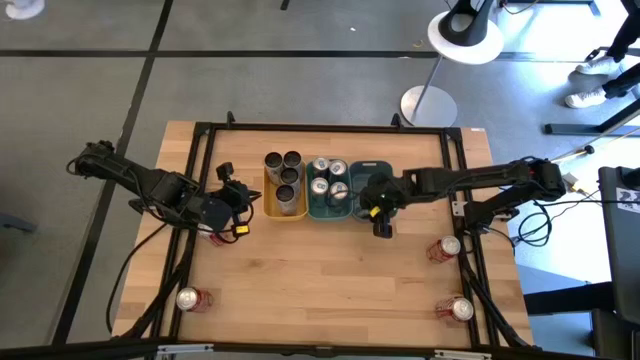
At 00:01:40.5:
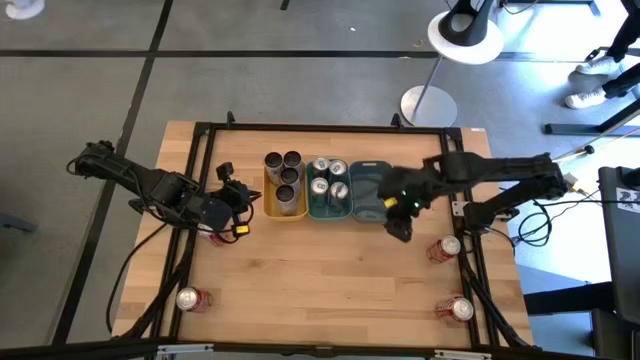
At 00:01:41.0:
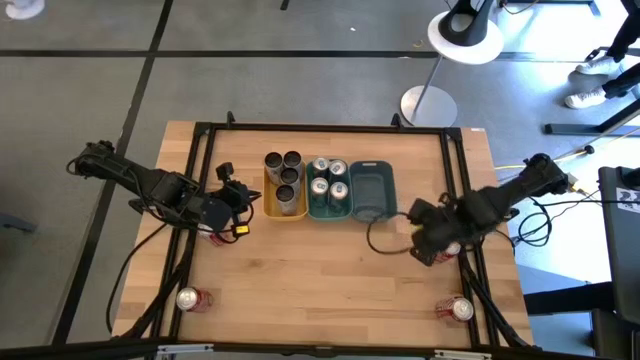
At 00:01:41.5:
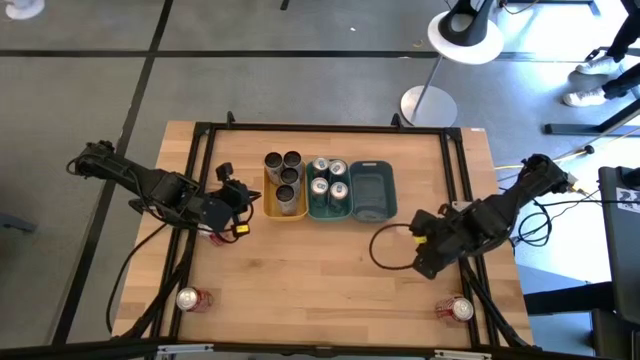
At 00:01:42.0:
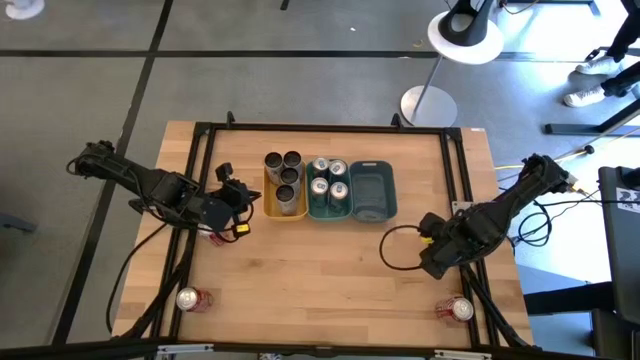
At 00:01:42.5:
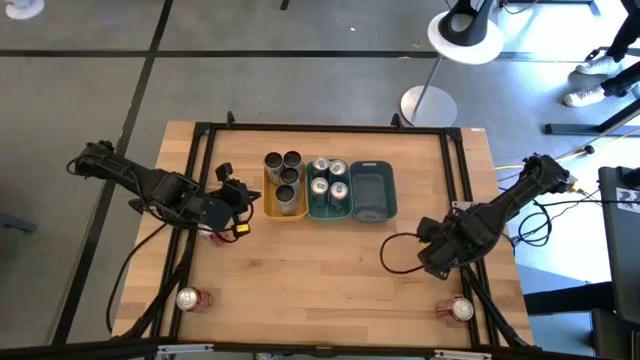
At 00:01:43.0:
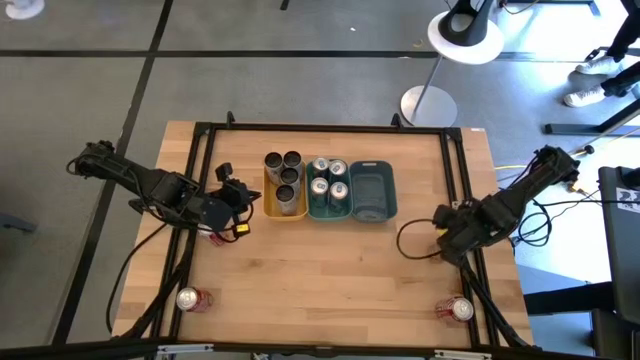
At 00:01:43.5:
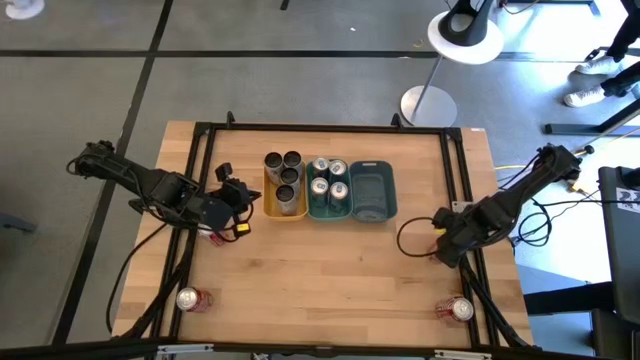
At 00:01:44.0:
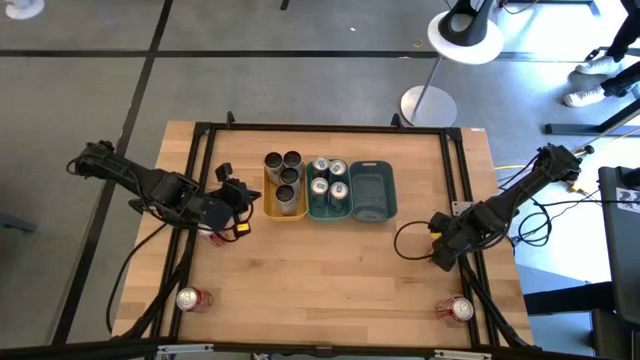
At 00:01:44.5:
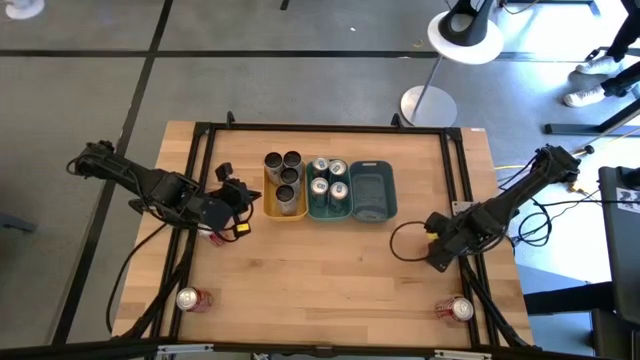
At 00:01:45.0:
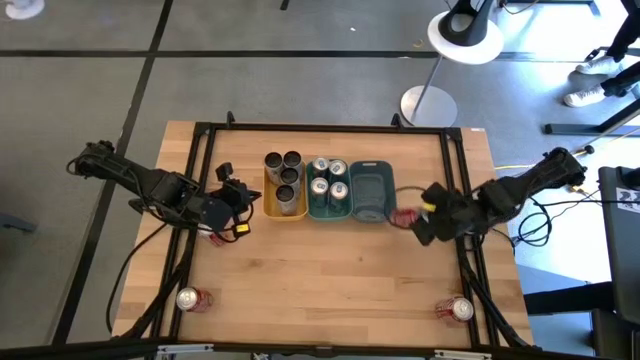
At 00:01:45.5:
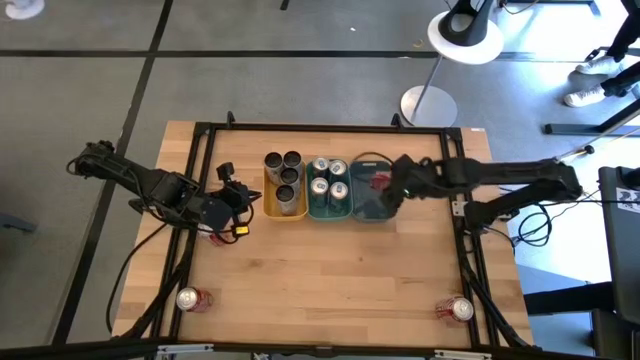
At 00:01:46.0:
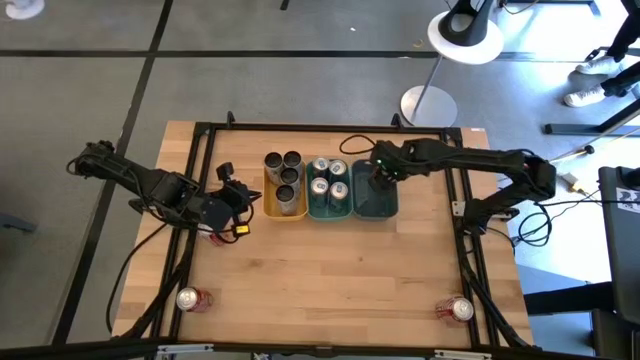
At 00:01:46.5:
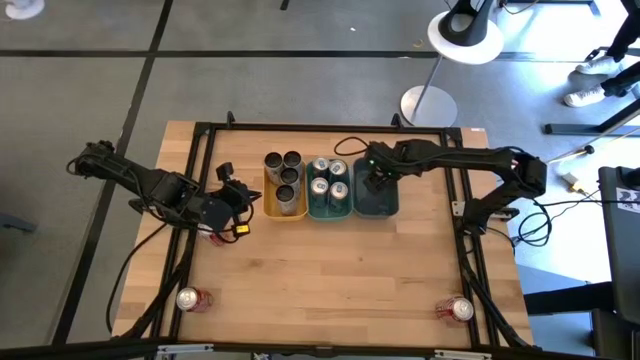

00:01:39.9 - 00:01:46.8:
Task: Sort soda cans
Put the top right red-white soda can into the blue bin

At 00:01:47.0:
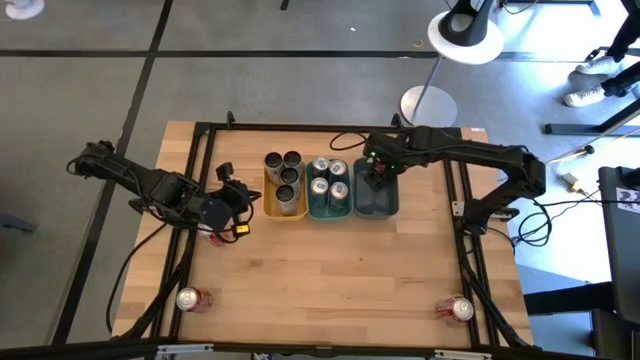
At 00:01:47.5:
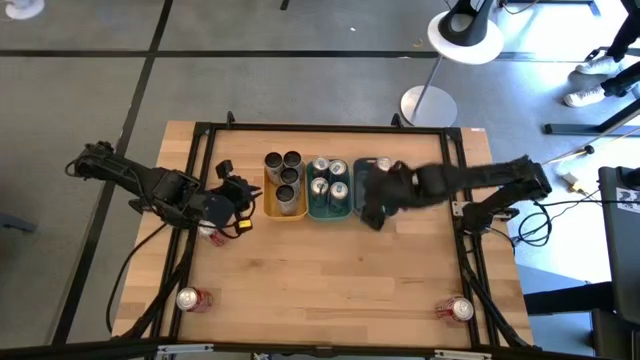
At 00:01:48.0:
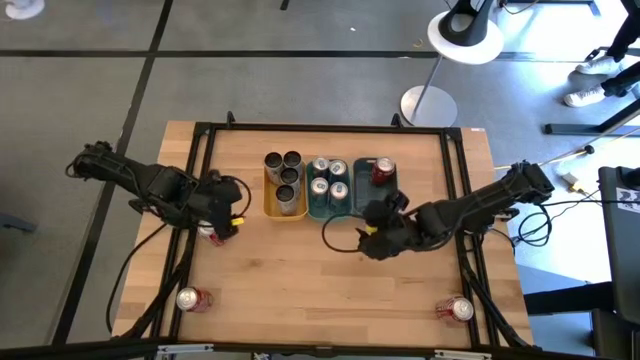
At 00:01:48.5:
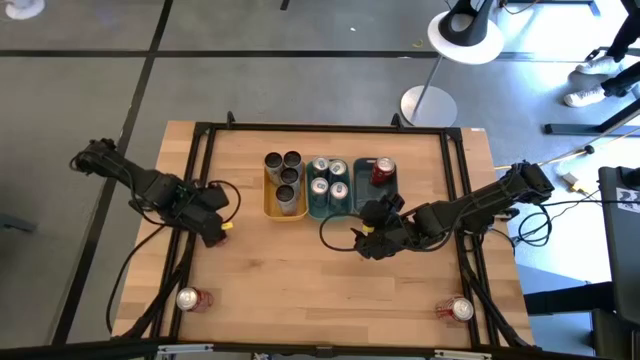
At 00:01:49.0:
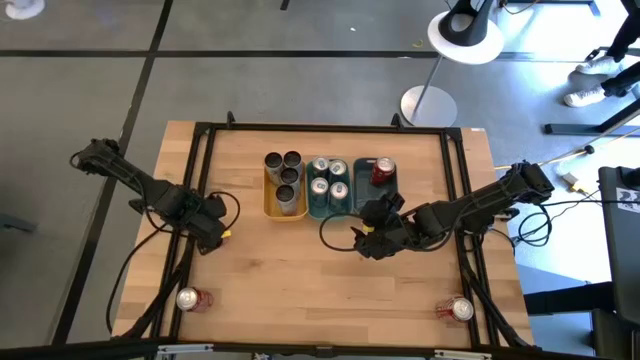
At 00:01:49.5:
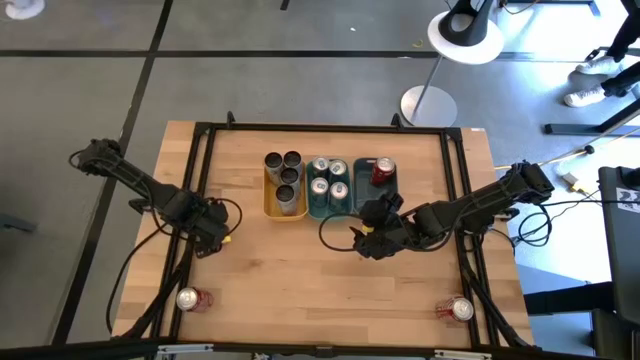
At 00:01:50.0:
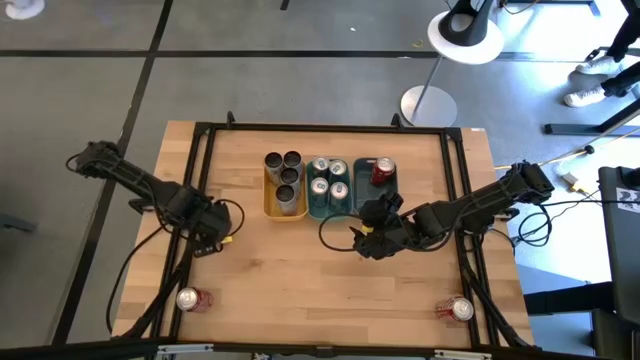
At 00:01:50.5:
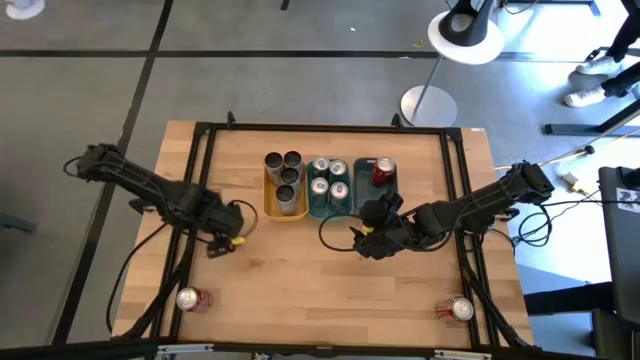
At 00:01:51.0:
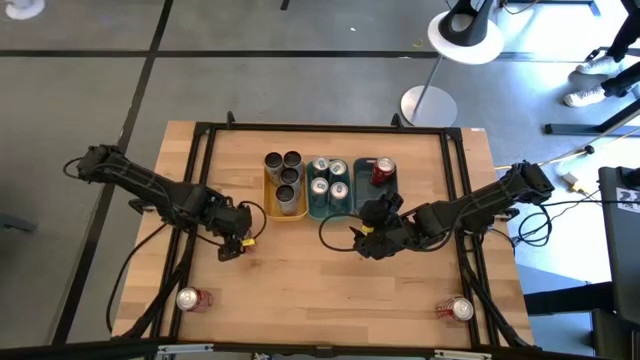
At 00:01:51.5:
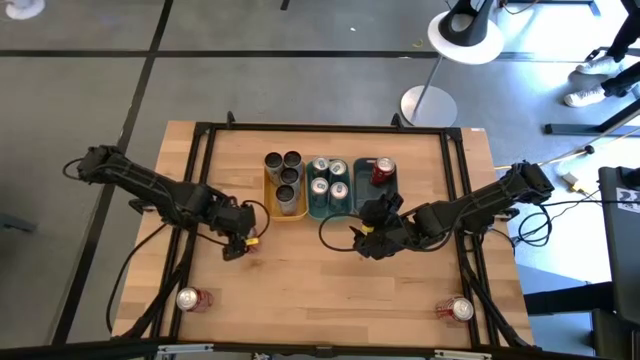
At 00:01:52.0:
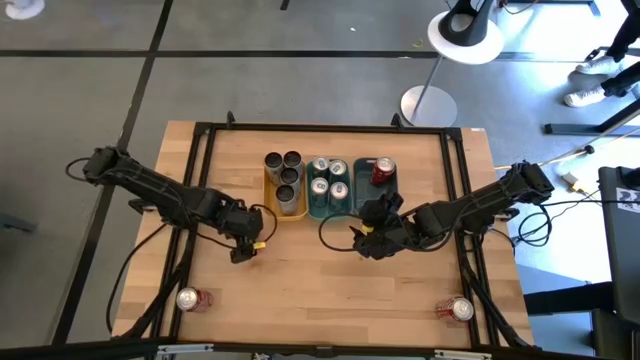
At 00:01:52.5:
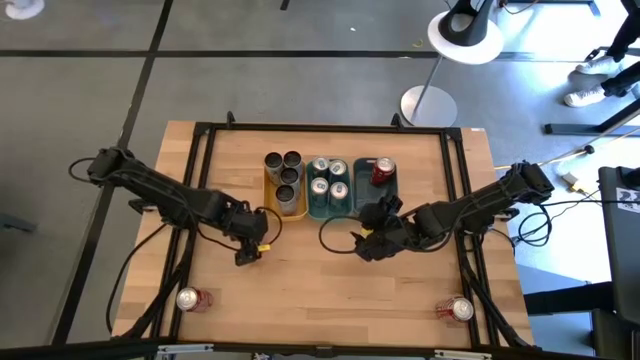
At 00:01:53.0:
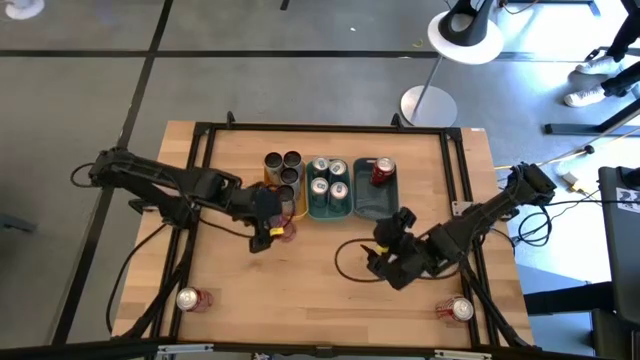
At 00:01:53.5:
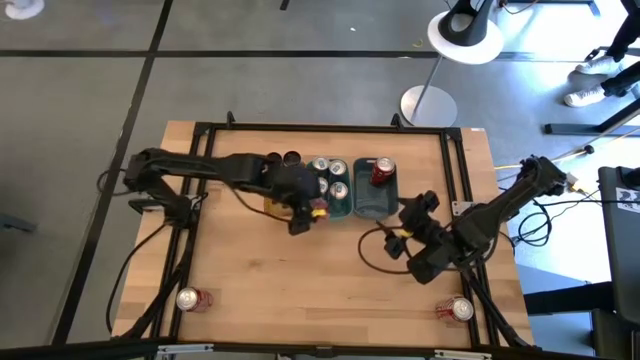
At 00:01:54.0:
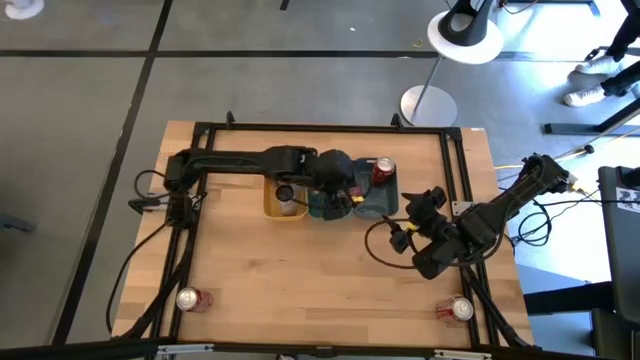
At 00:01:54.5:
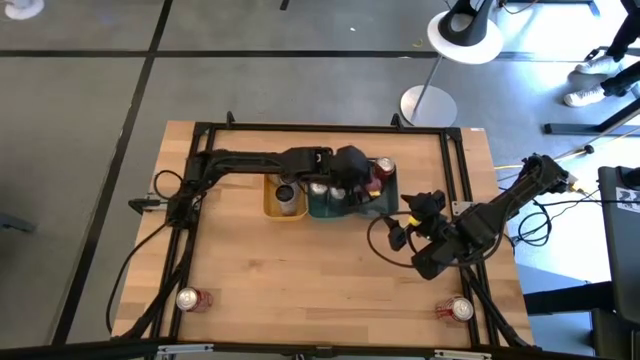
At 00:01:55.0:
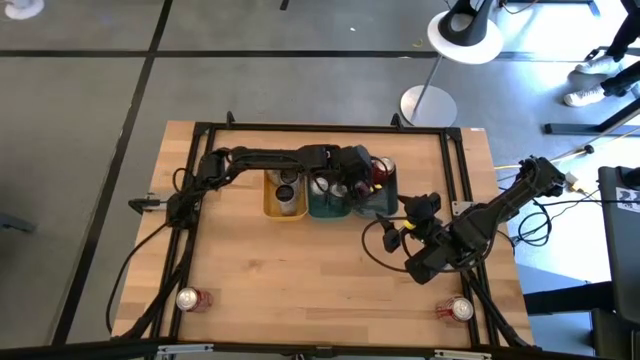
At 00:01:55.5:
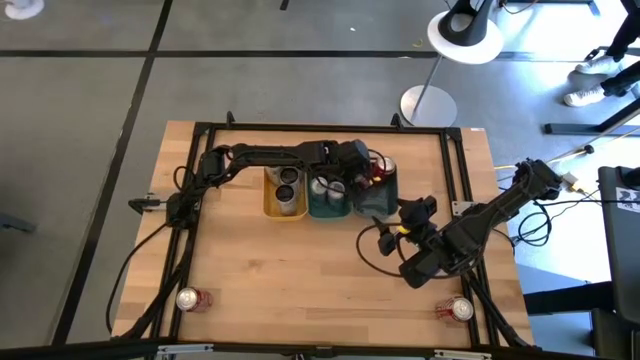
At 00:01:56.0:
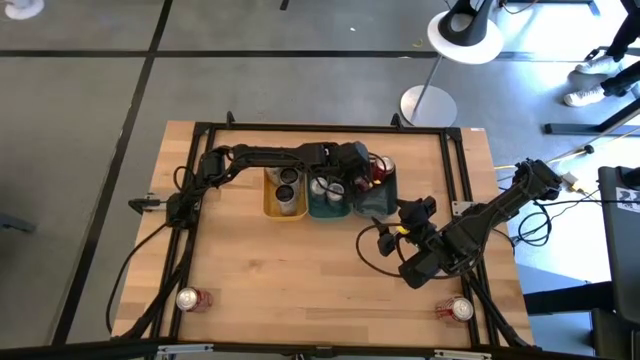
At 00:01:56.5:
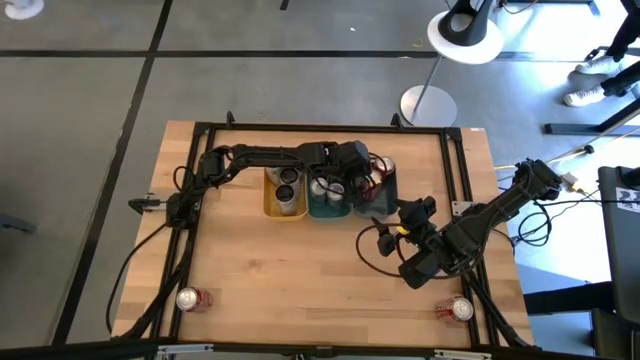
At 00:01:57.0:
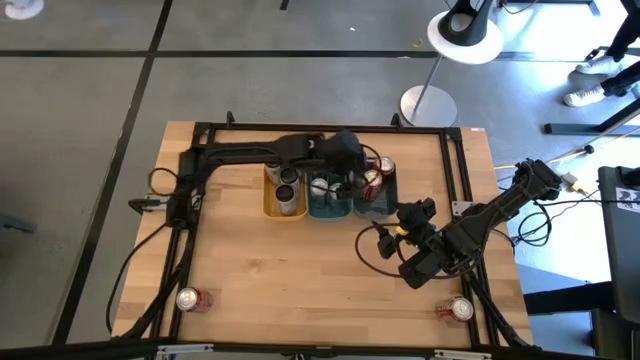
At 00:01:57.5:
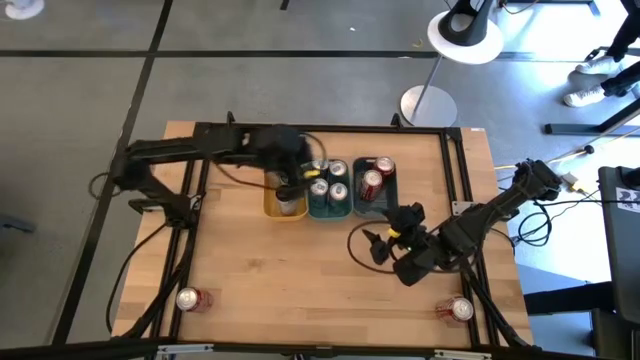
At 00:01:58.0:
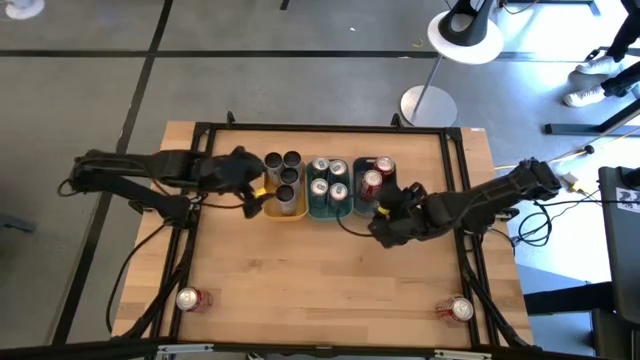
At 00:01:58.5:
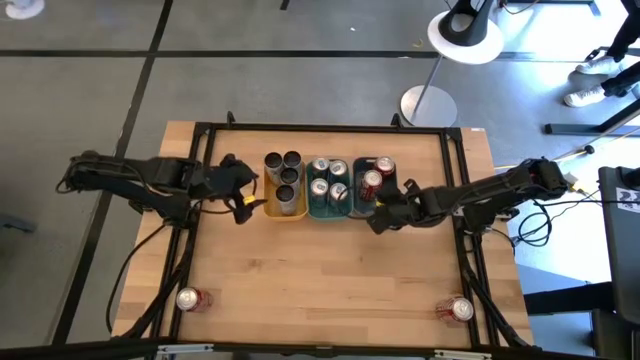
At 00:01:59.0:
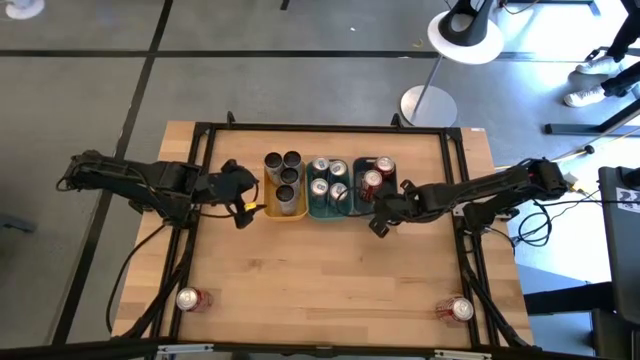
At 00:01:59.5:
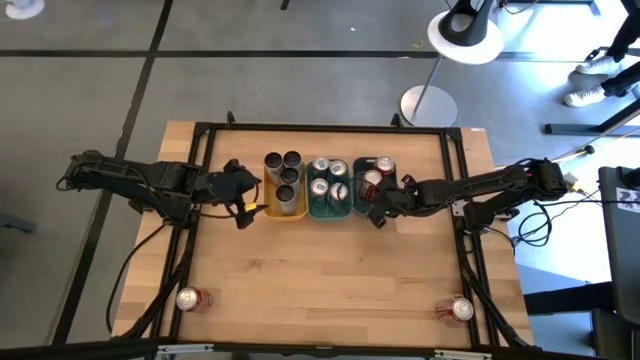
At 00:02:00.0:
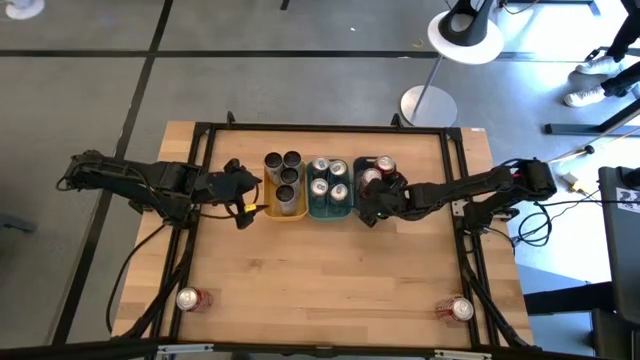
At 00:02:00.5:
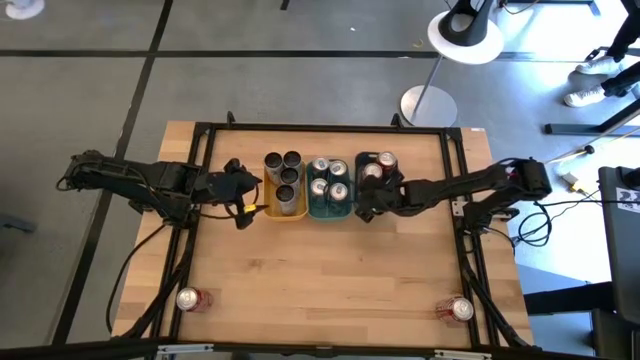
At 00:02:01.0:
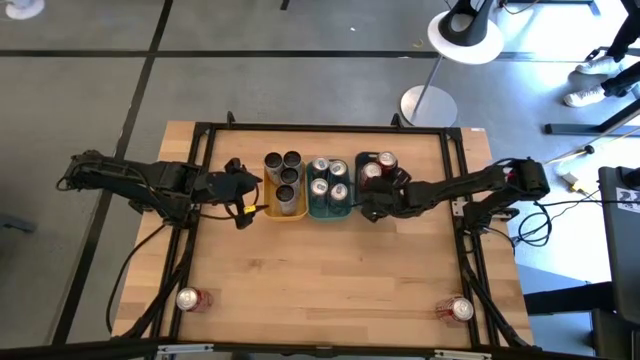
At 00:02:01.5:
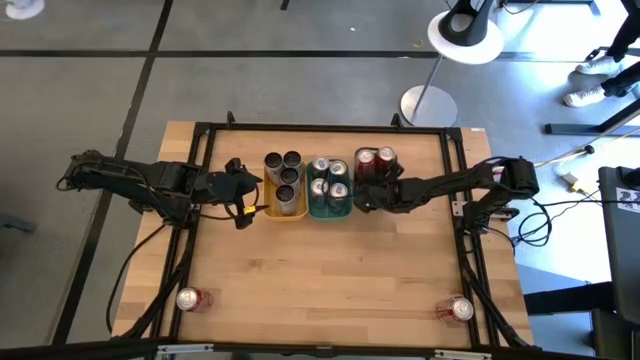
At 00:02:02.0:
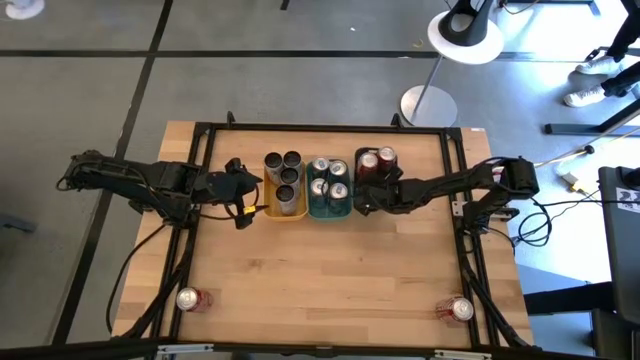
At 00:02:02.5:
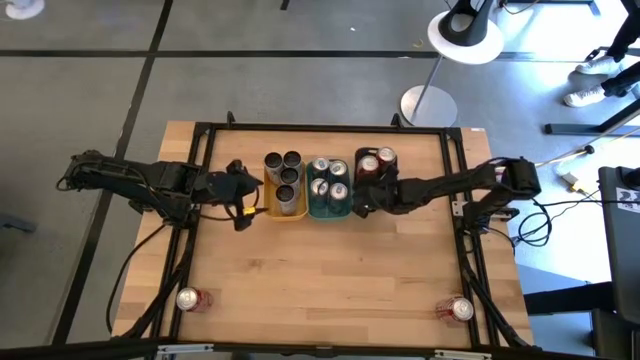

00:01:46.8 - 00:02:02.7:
Put the top red-white soda can into the blue bin
